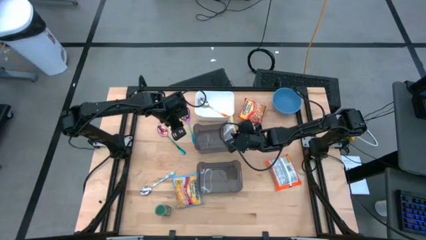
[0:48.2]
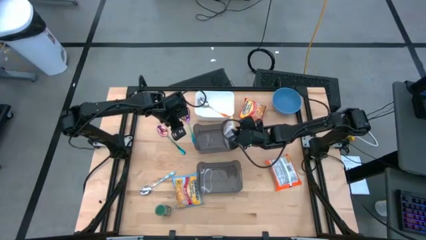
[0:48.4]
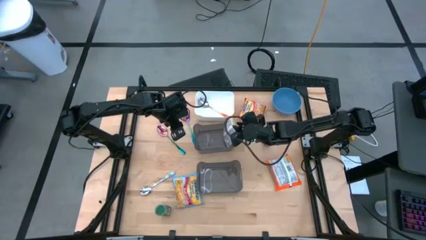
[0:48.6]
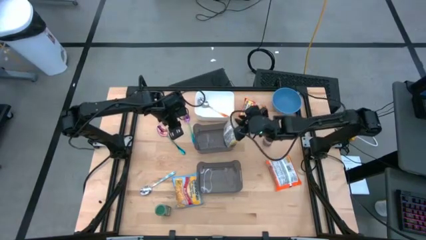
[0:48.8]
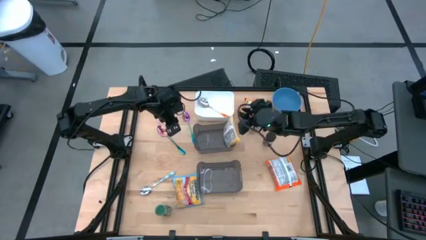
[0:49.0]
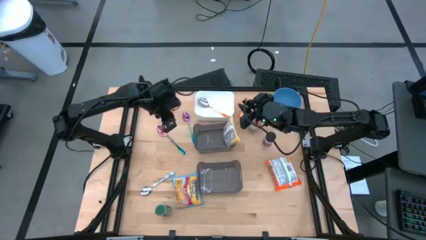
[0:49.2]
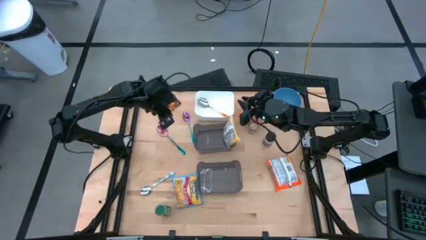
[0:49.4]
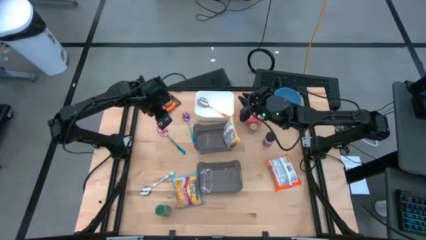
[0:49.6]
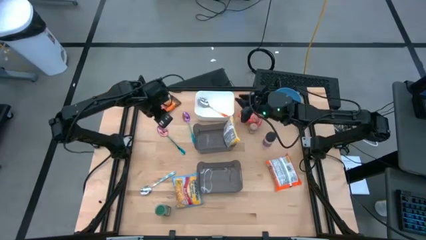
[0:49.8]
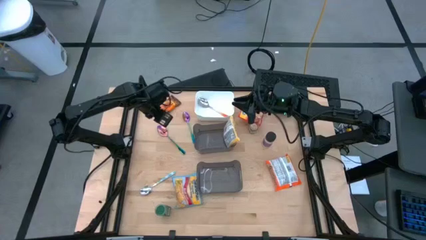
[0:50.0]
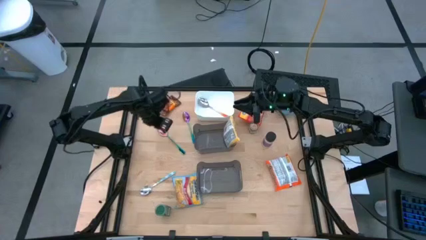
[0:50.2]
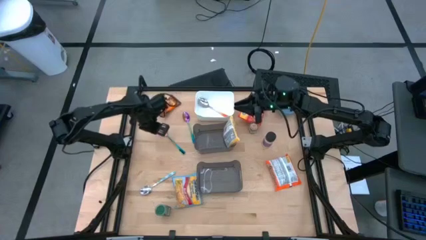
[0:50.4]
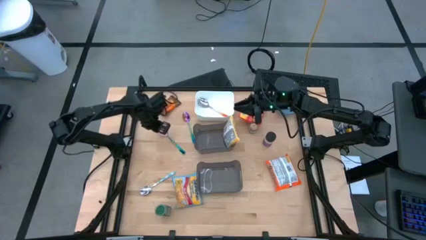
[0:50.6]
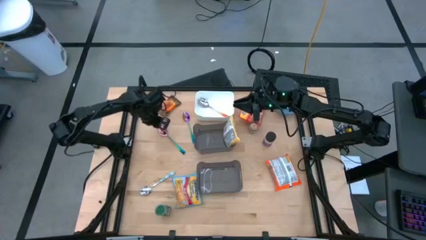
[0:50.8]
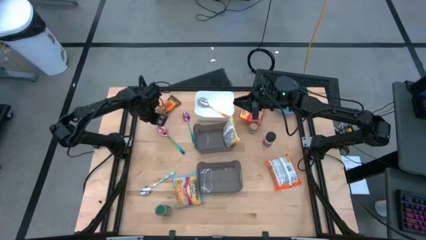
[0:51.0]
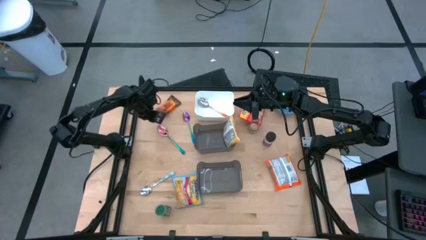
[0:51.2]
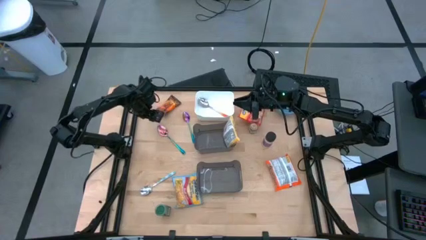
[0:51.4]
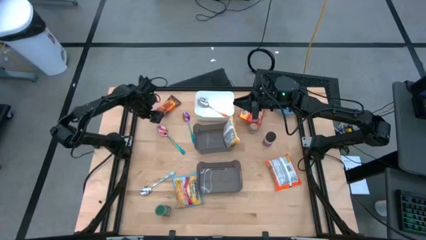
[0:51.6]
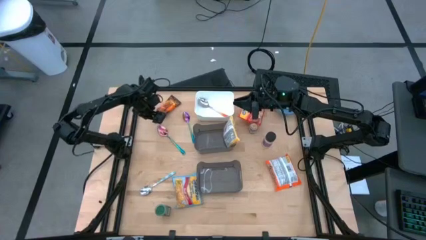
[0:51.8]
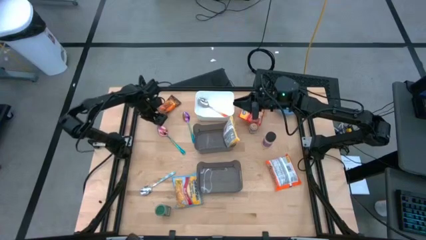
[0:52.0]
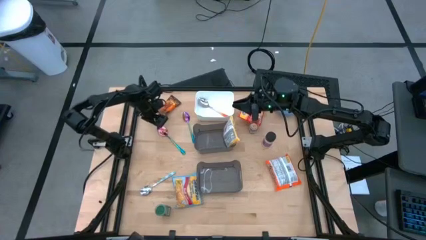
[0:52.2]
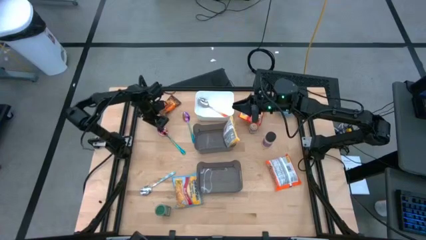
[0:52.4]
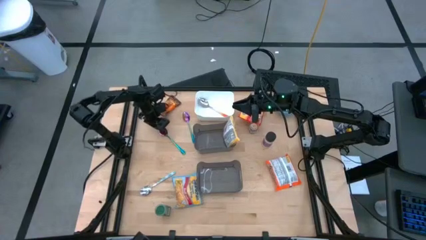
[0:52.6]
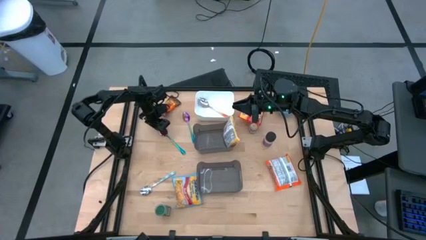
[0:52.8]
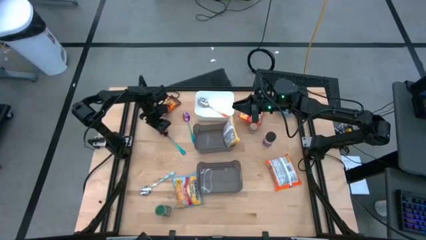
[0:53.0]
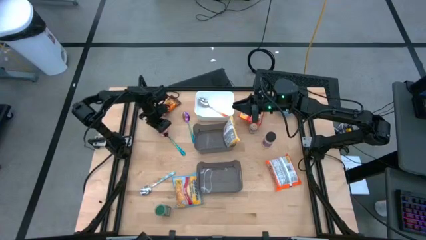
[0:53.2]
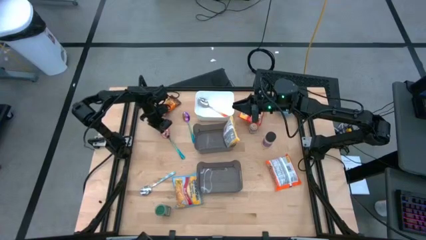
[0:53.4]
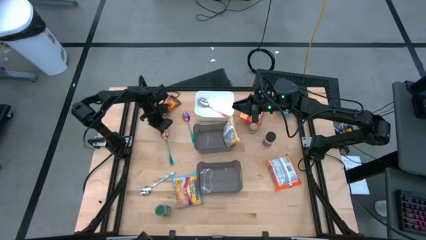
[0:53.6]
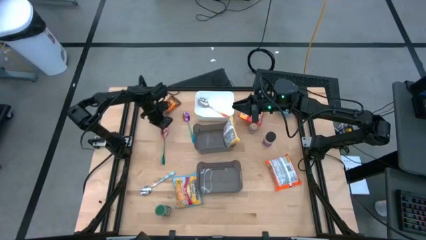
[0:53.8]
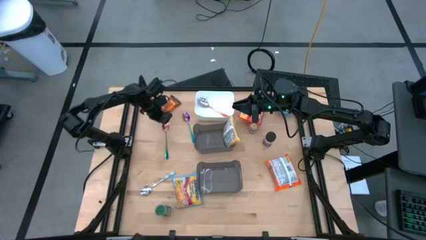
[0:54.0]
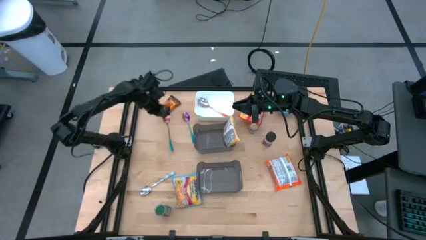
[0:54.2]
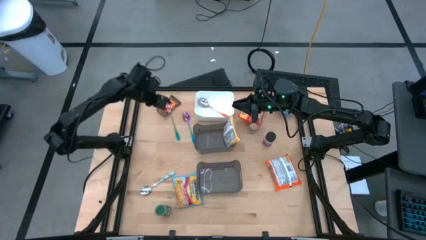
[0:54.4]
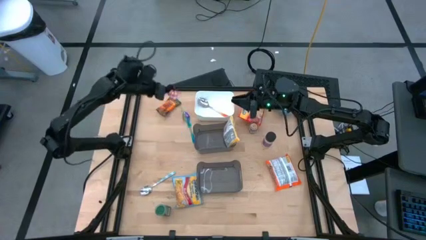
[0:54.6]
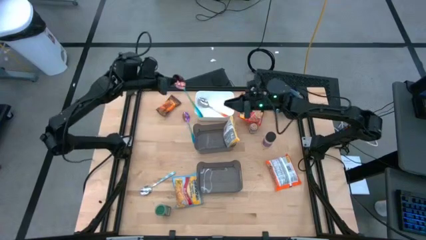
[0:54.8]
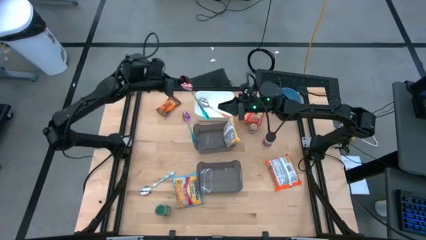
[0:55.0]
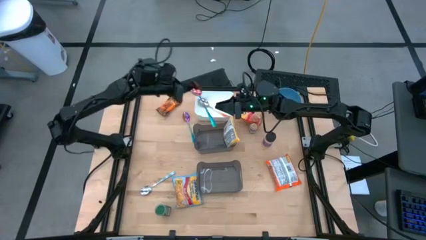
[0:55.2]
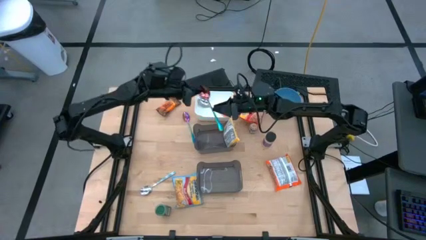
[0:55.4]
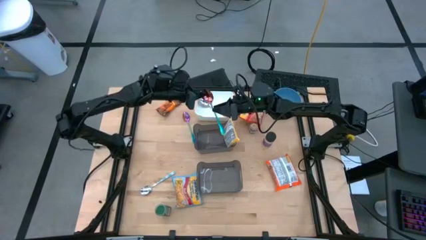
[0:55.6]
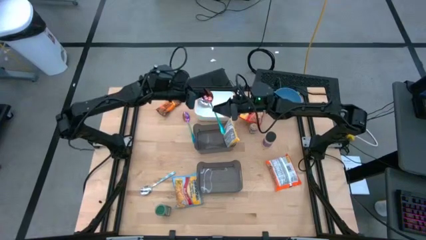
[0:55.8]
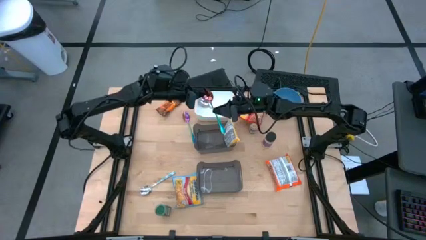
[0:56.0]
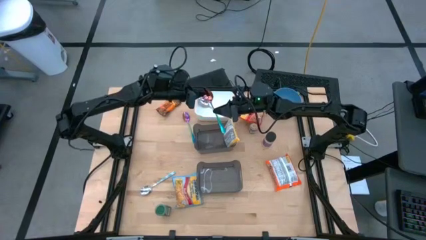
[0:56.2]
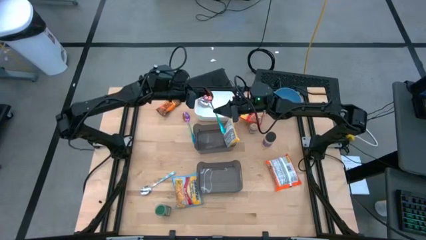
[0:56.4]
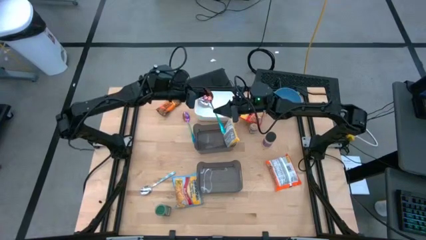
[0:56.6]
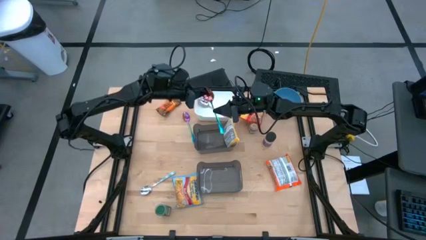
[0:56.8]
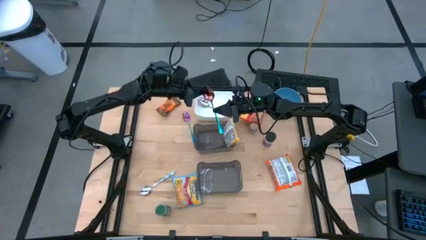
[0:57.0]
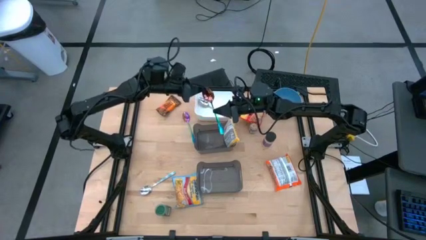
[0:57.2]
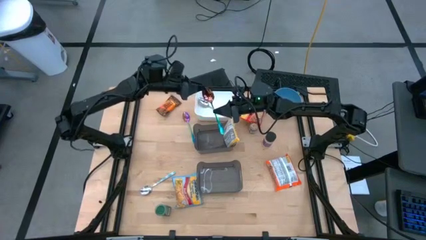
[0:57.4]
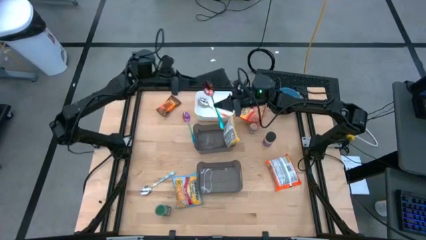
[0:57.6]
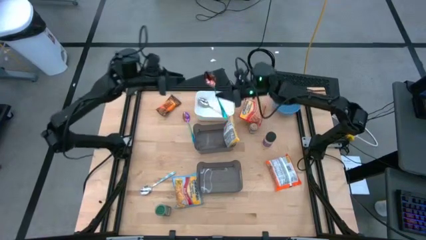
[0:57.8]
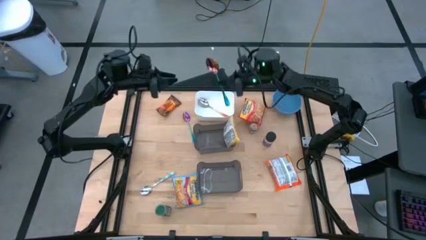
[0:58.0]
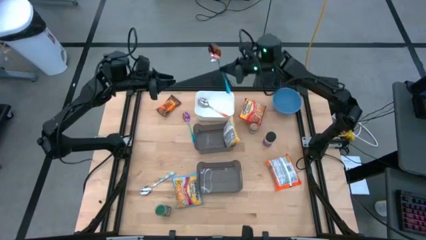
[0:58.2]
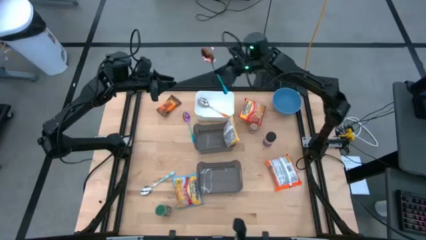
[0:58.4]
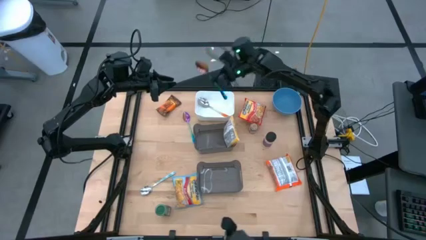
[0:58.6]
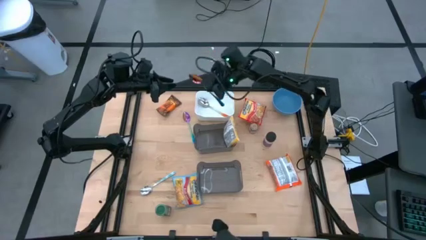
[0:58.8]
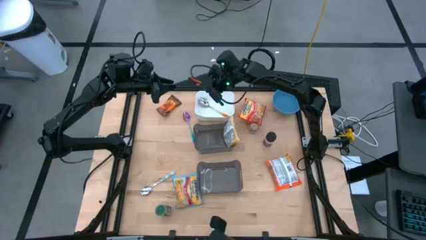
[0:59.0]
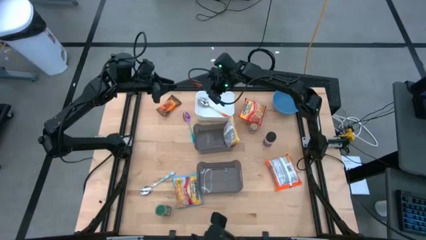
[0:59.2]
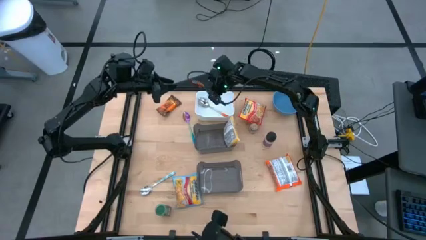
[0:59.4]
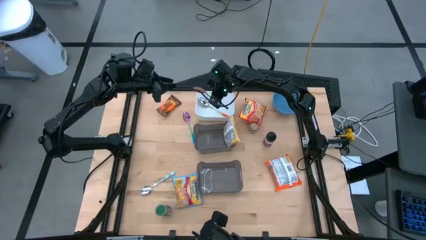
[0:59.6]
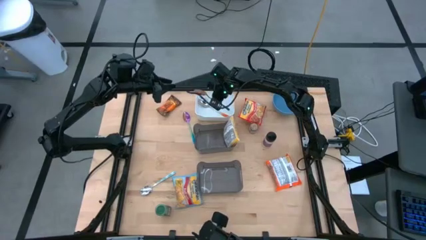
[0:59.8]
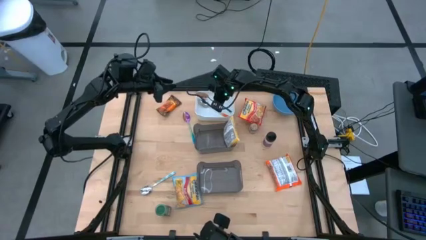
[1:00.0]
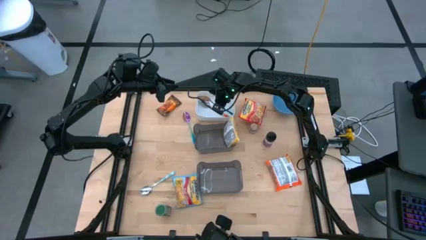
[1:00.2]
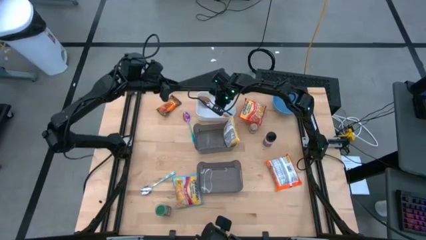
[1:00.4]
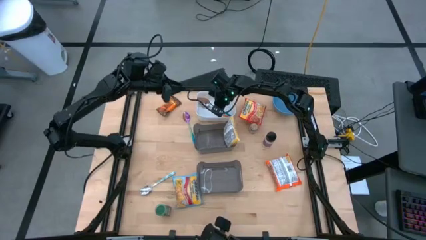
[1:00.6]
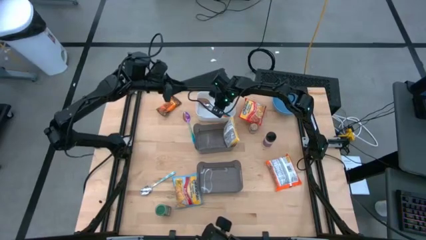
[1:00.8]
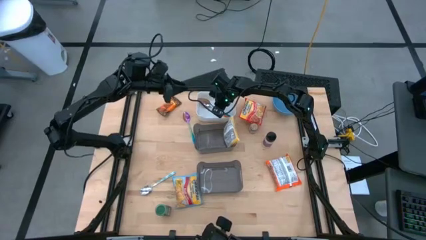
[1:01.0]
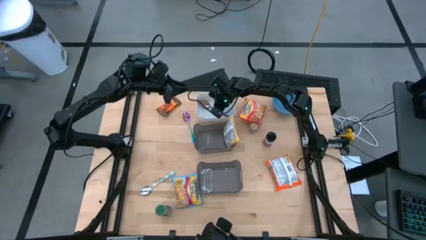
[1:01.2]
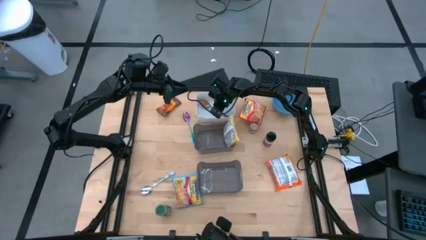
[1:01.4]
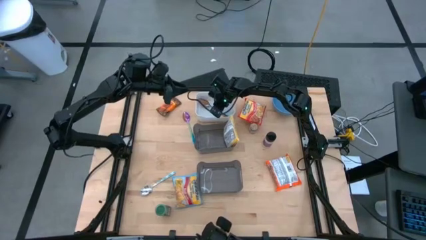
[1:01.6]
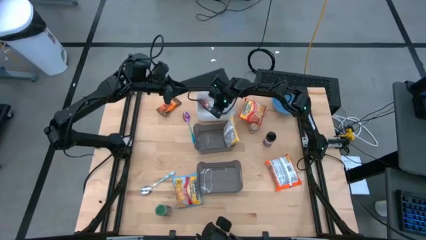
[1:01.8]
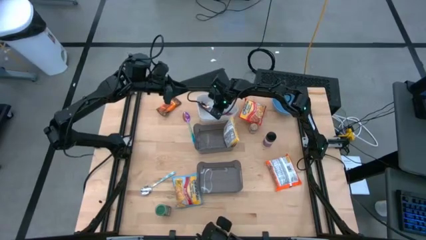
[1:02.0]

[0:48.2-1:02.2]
Task: Pick & Place Food Item
Put the bottom blue spoon into the white bin
